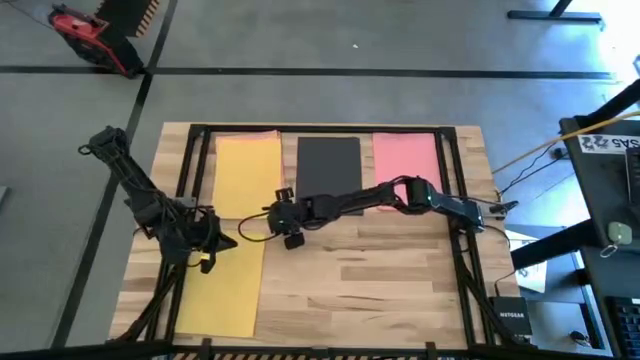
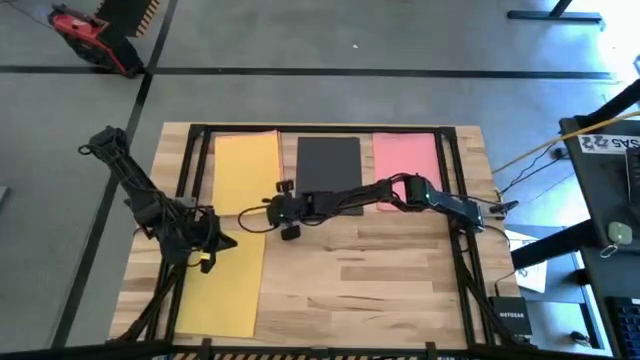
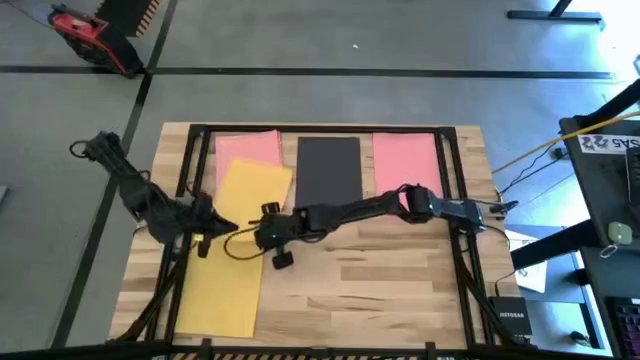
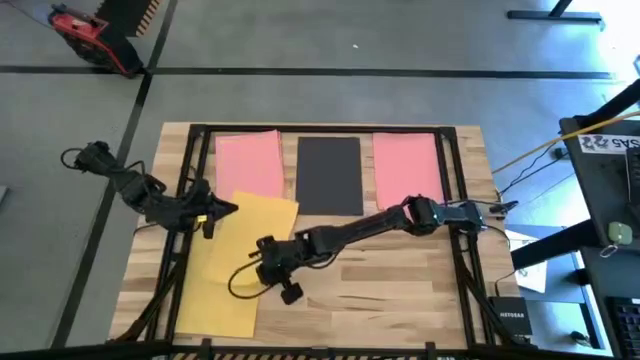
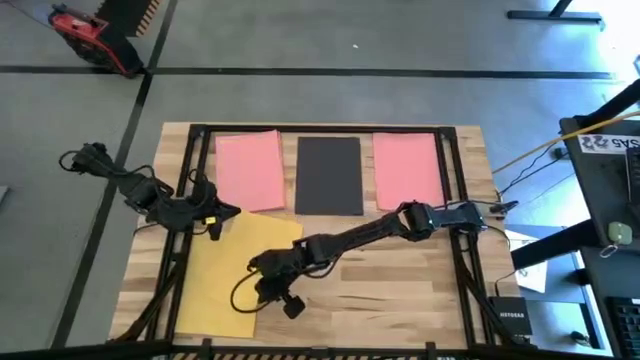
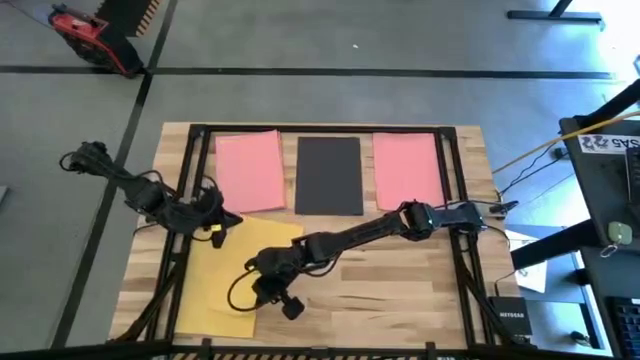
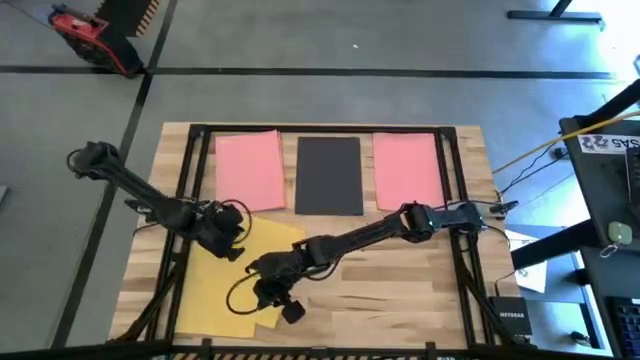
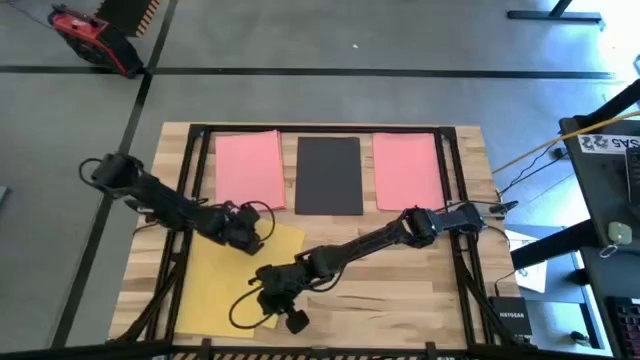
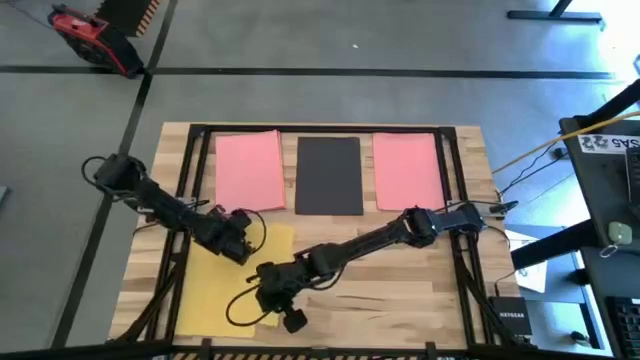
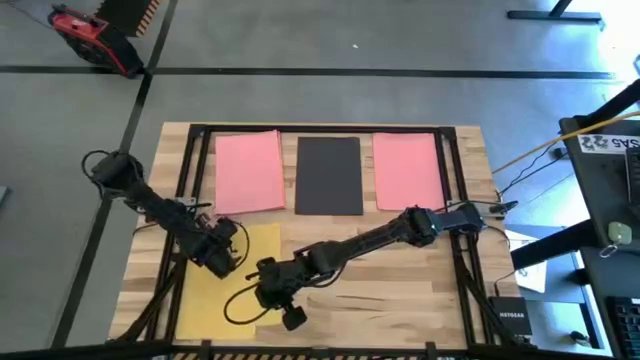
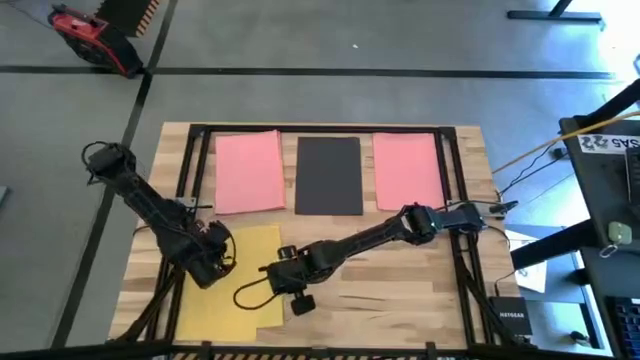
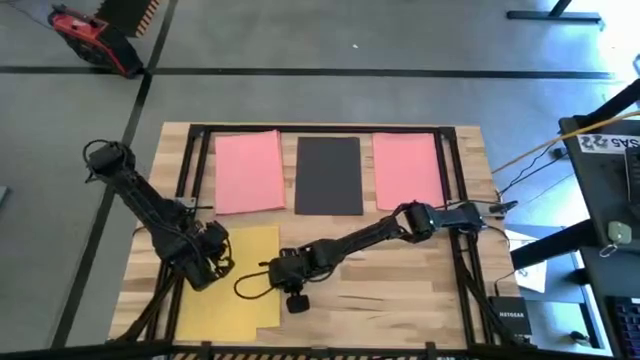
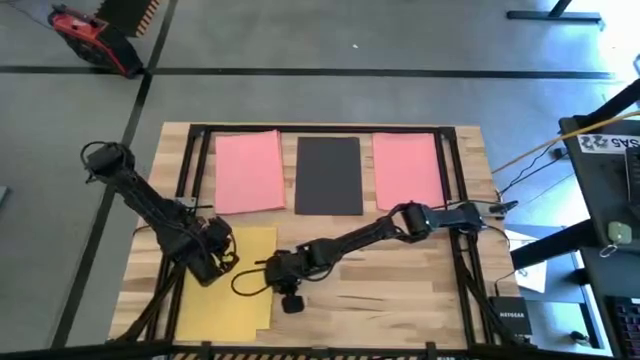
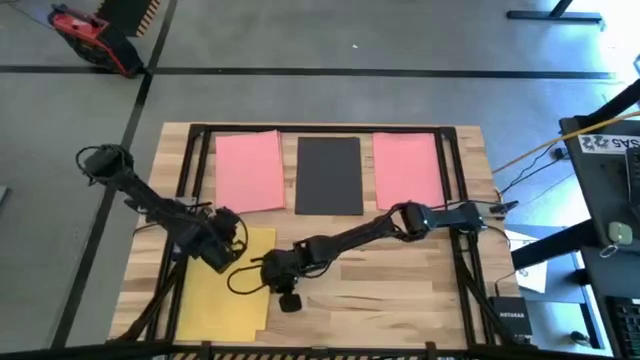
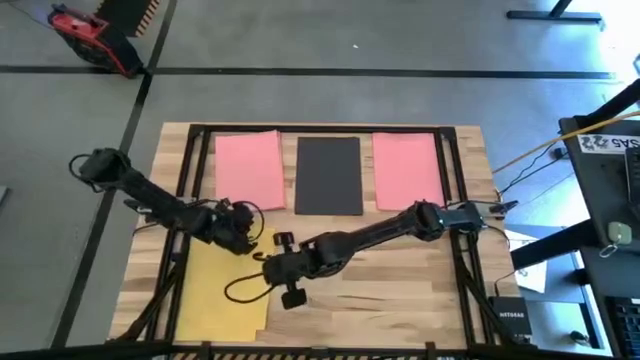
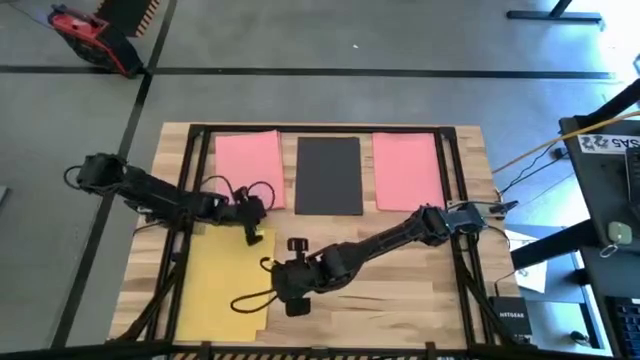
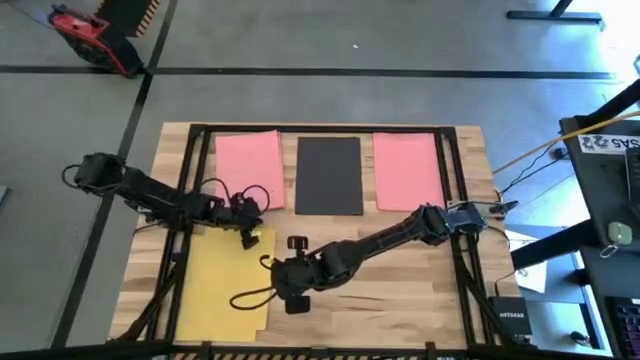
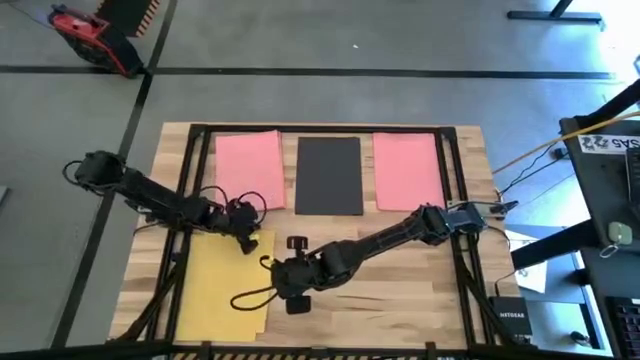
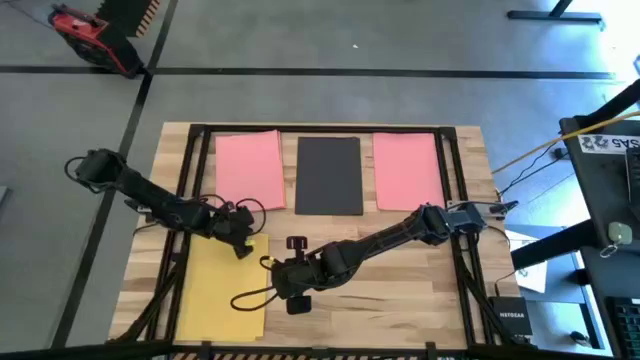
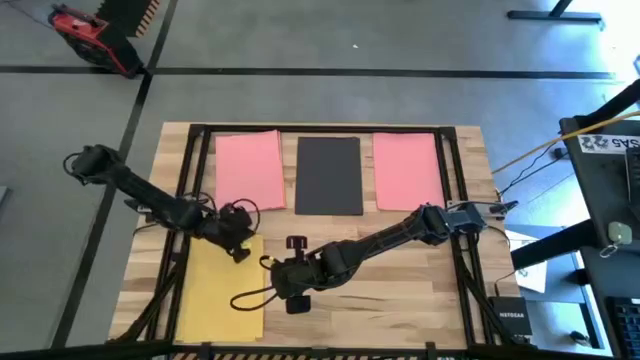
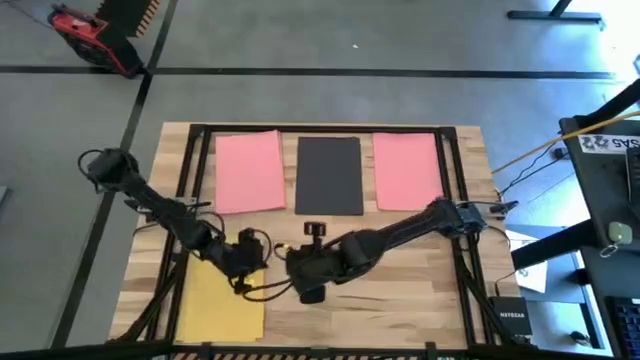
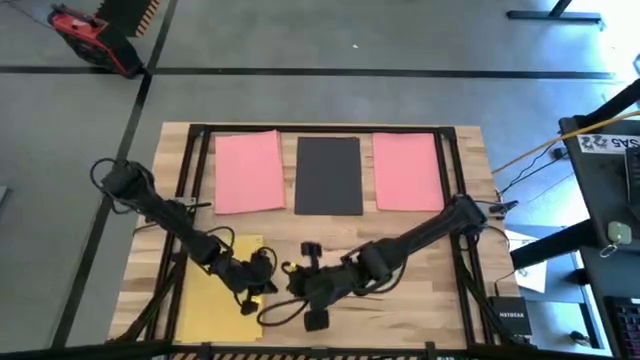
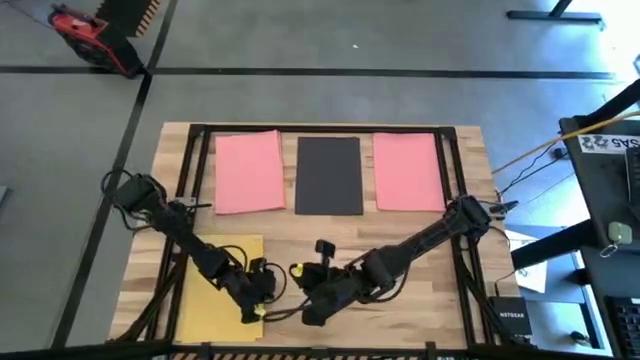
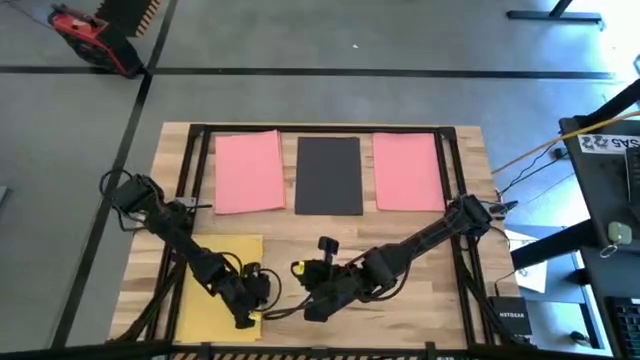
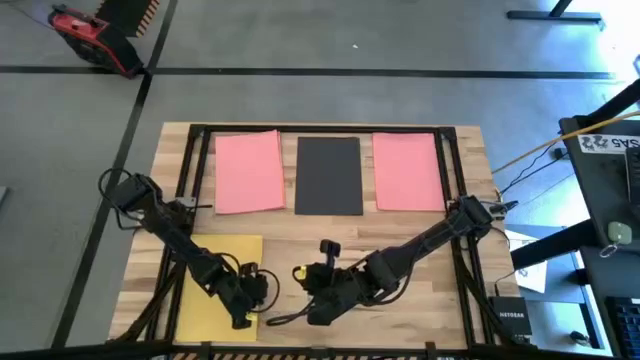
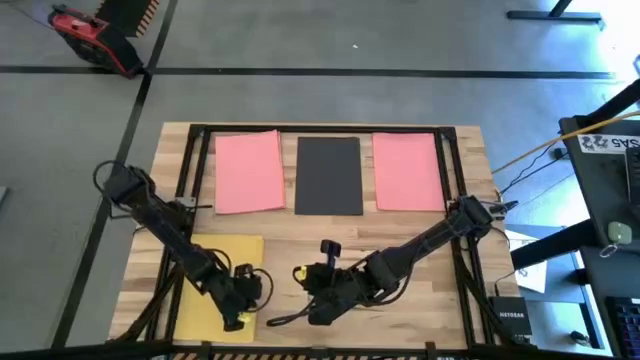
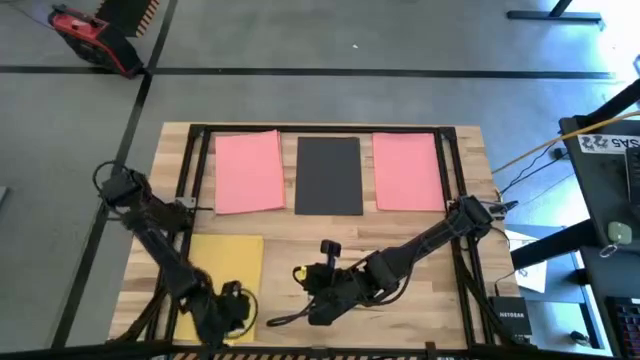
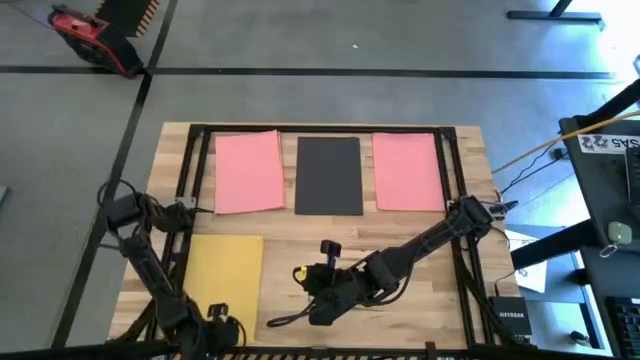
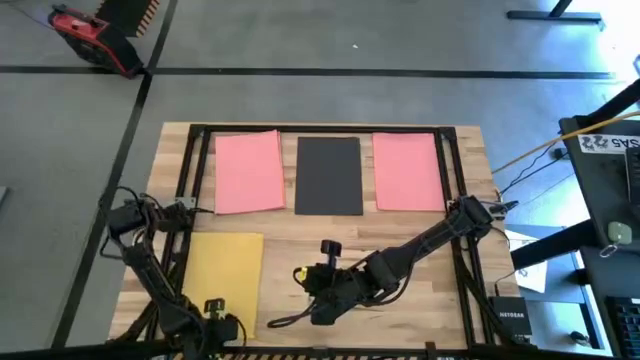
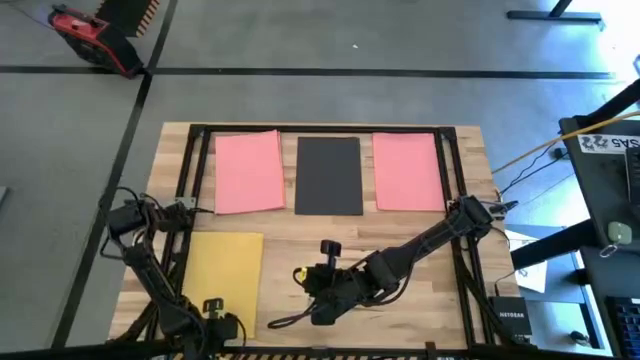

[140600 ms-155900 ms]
Task: Organize paper
Stack the yellow paper on top of the stacked yellow papers

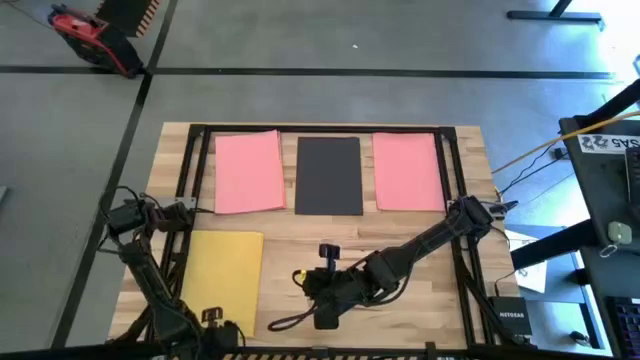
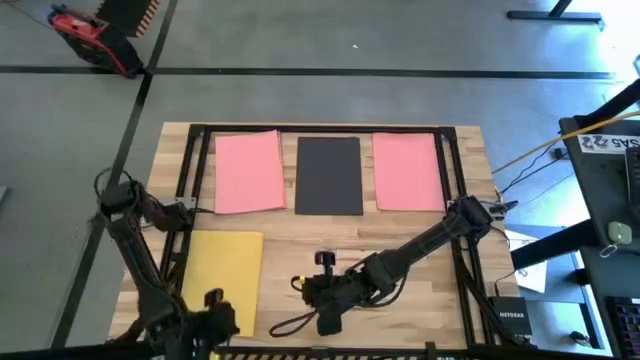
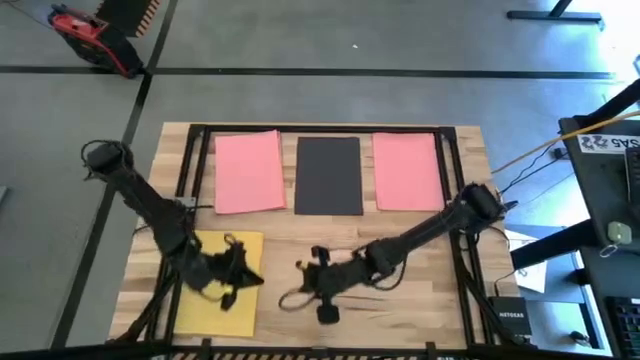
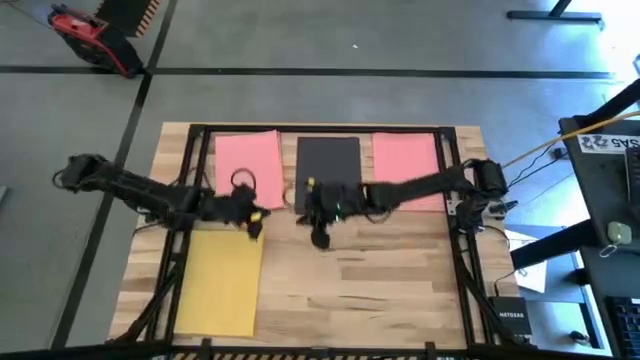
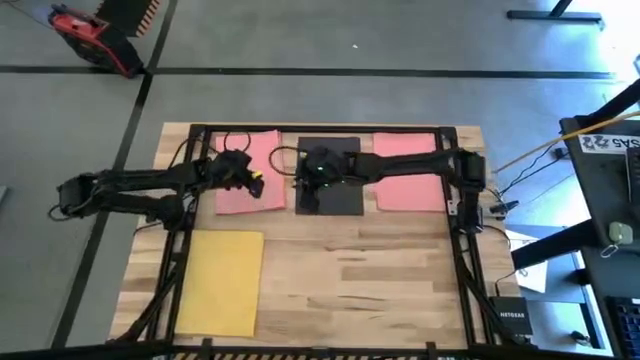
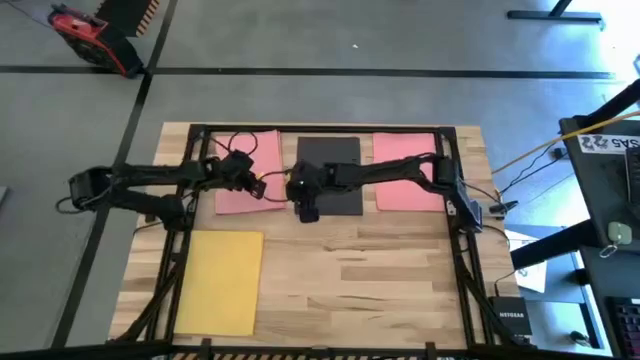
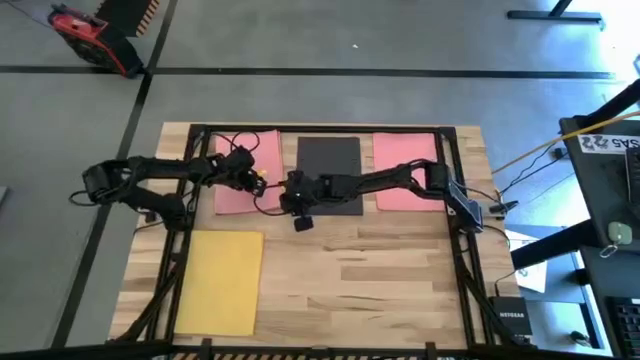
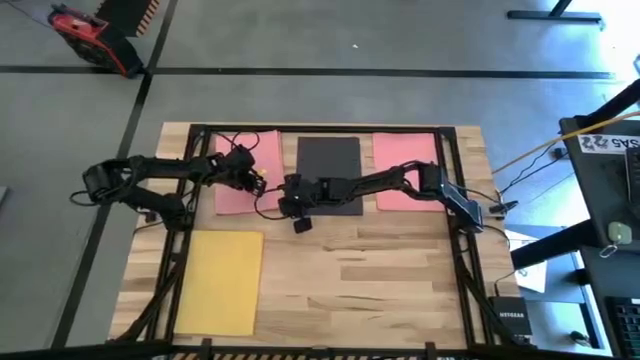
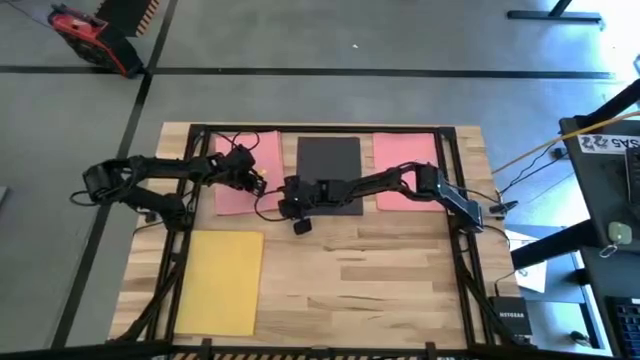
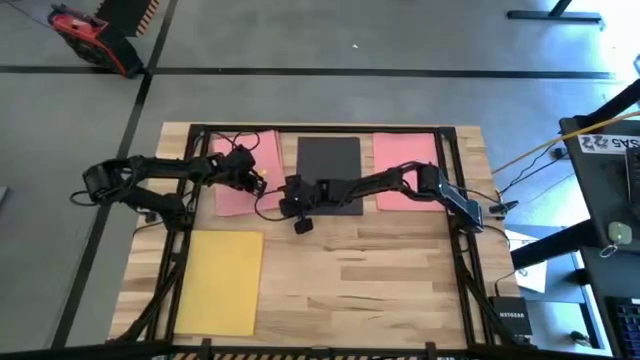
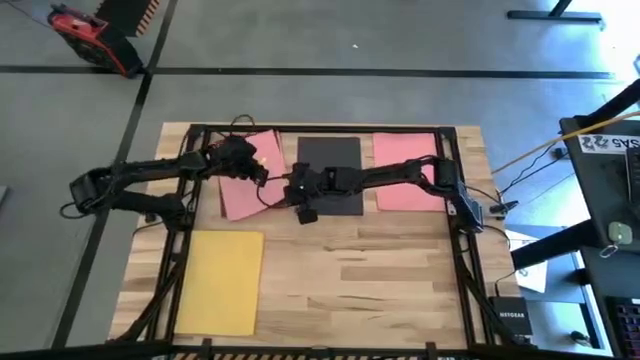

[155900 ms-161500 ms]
Stack the pink paper on top of the stacked pink papers

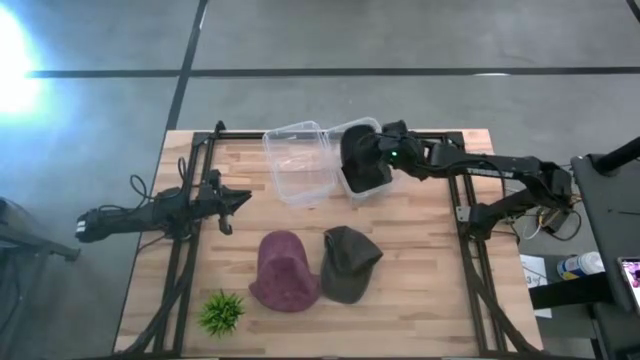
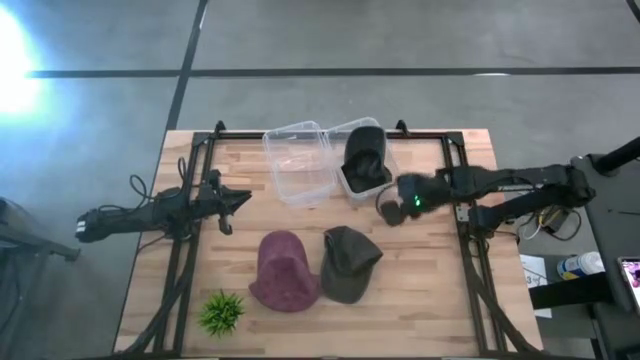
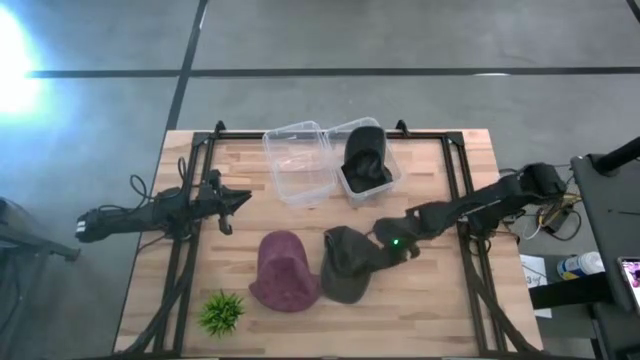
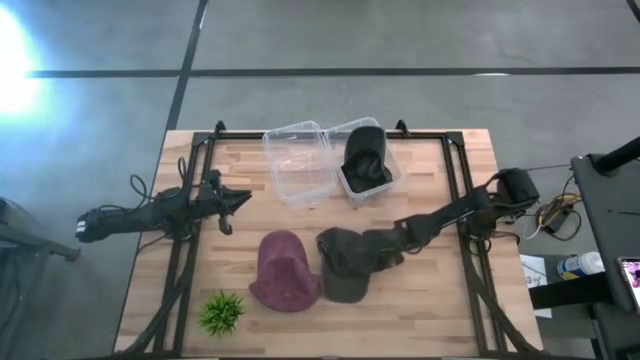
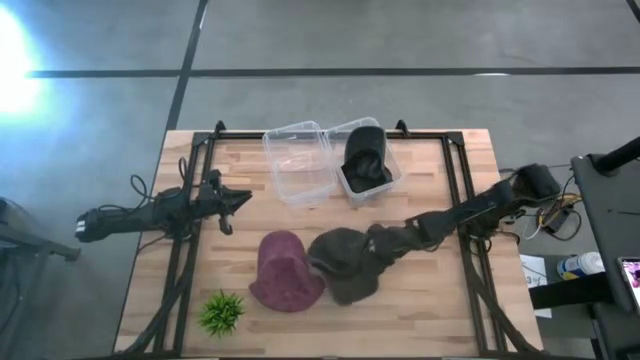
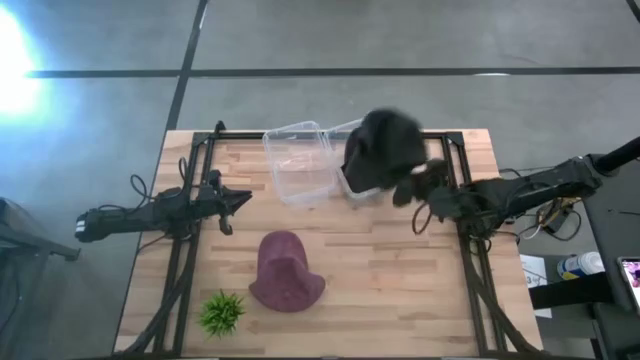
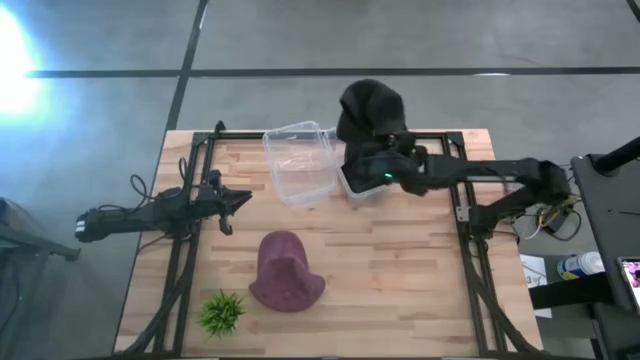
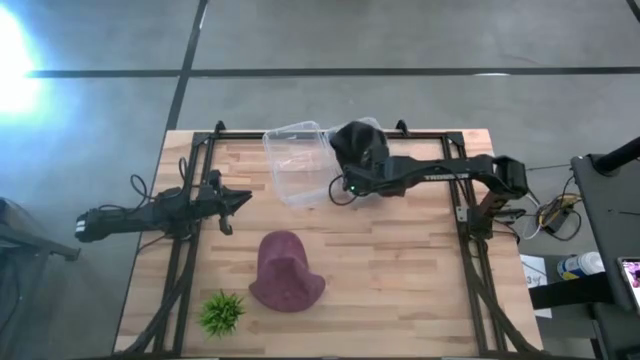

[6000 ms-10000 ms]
Task: Pick & Place hat
Put the black cap into the right transparent bin
